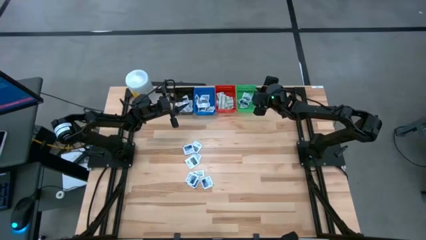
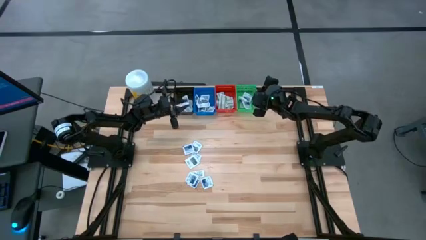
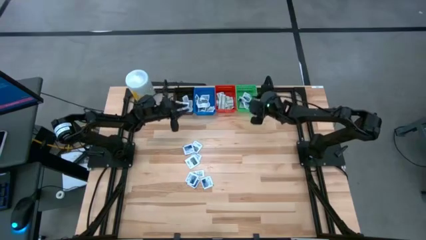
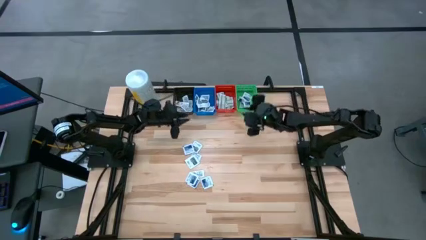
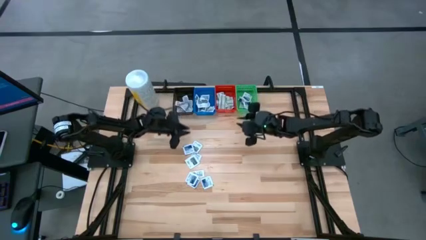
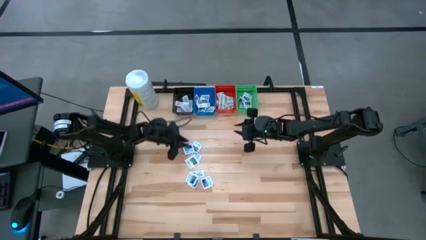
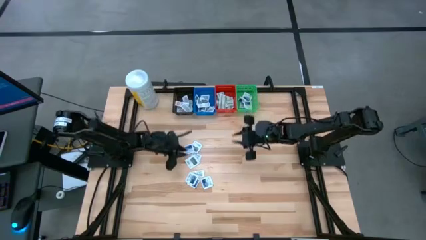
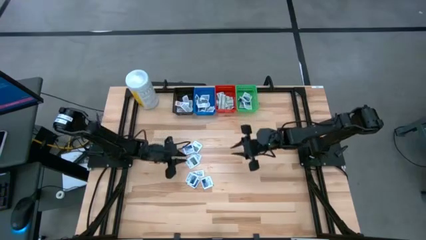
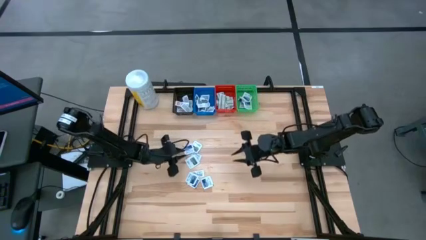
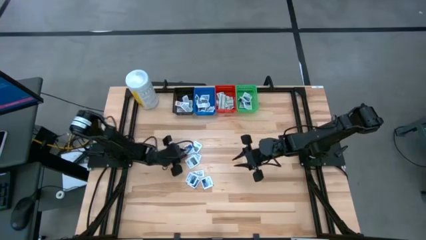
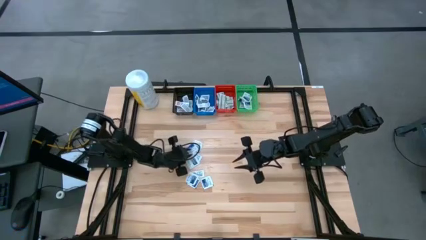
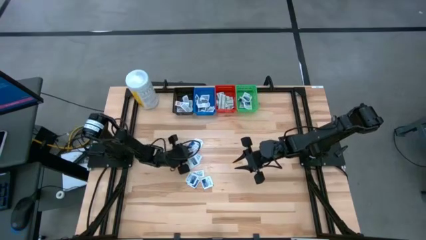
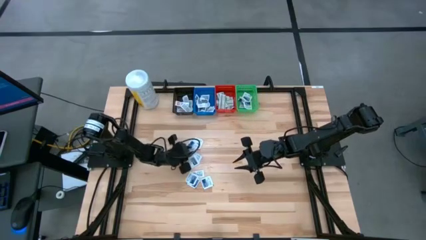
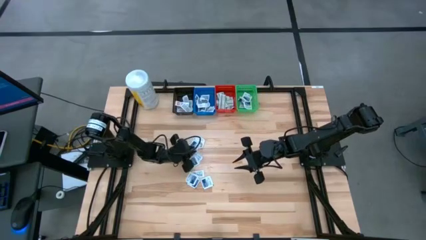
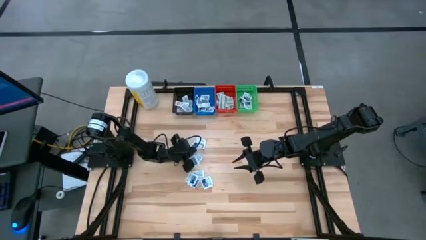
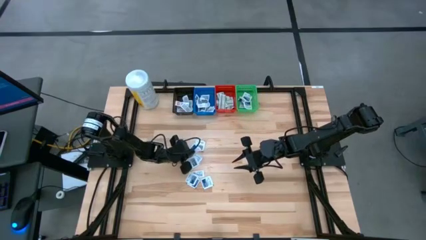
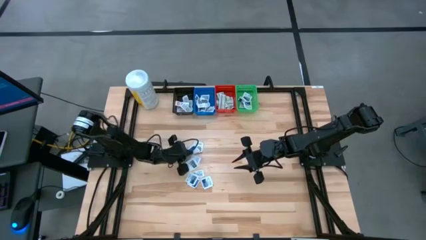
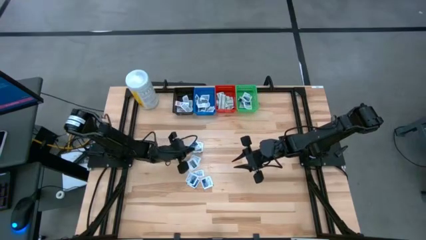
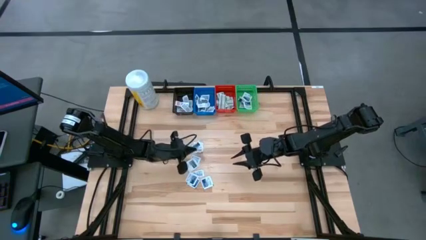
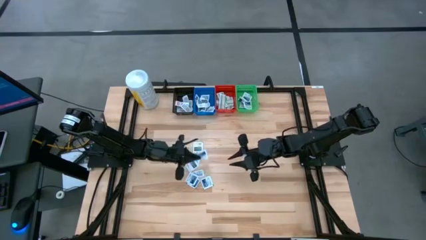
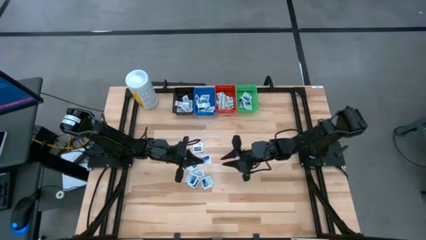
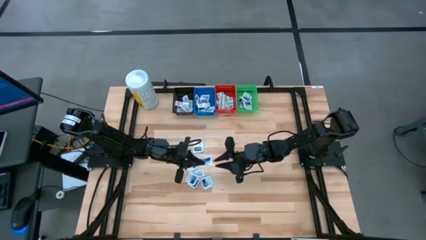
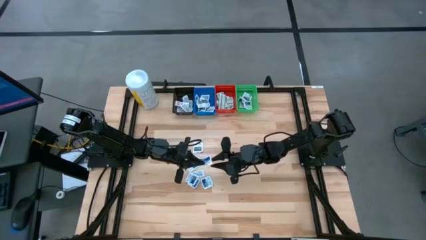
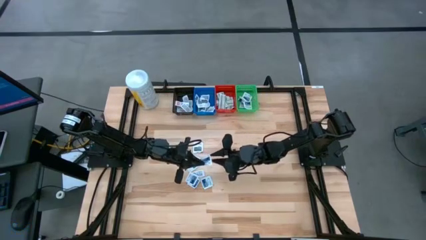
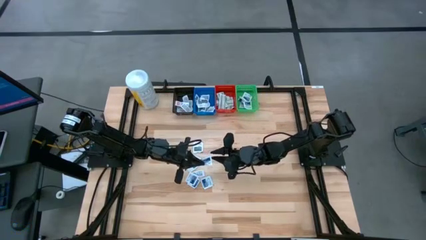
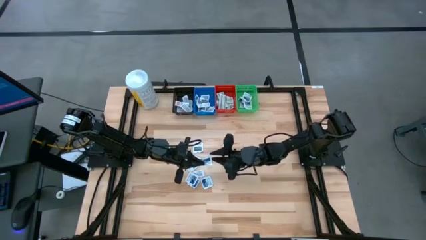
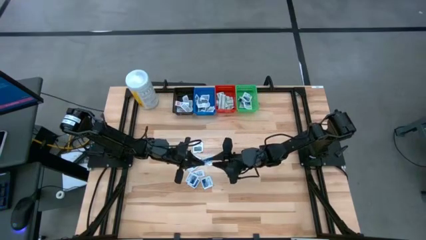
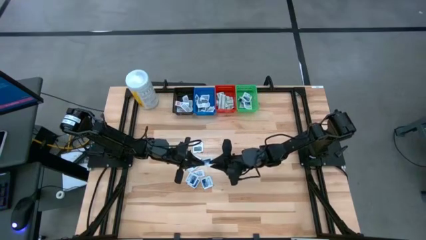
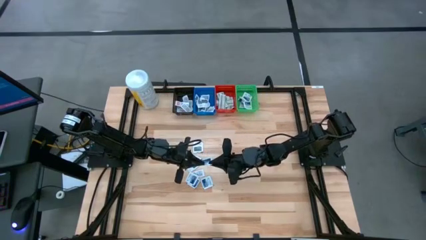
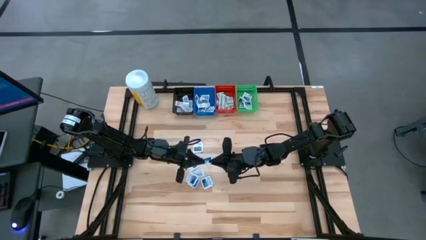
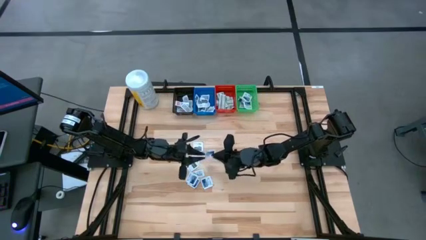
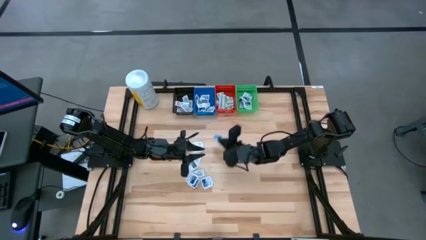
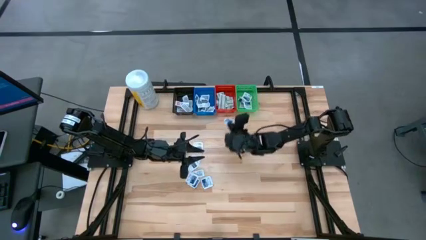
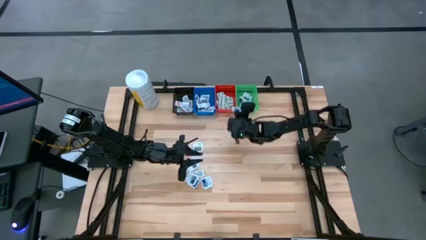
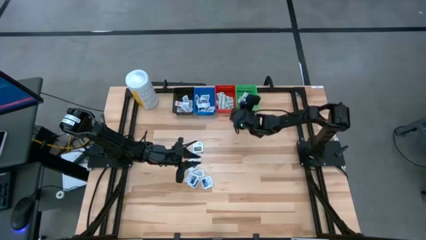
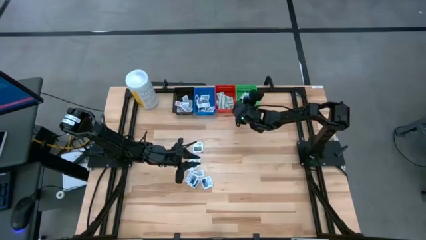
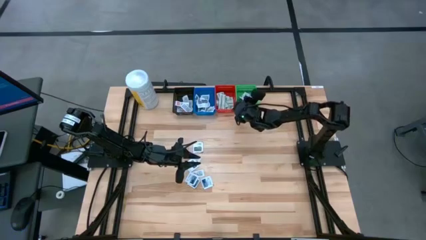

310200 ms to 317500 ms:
Task: Pick & Place First Aid Supplies
Put the blue alcohol pad into the green bin

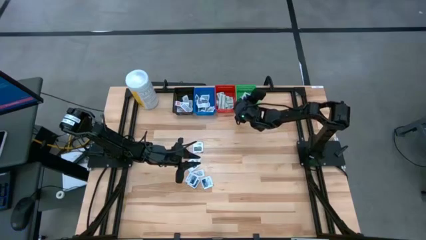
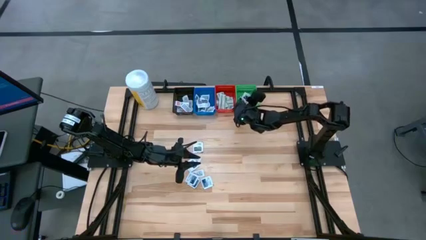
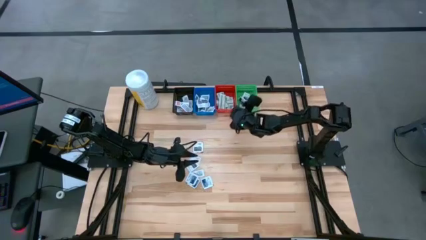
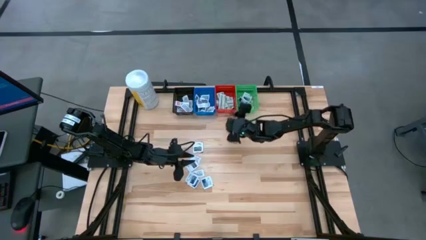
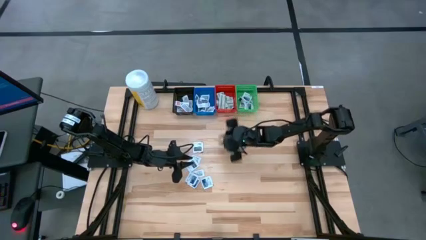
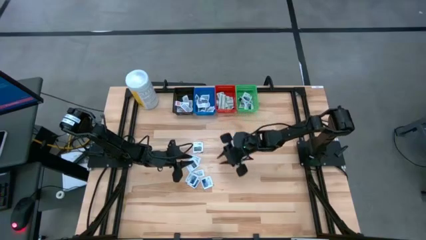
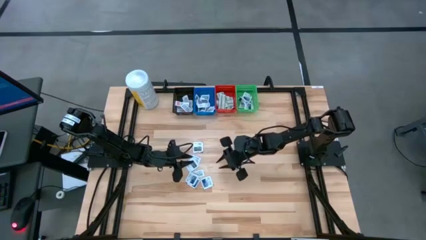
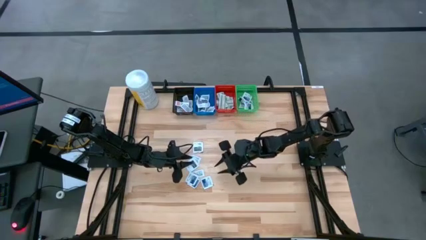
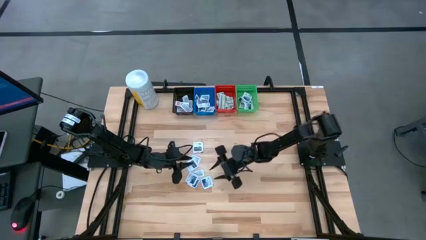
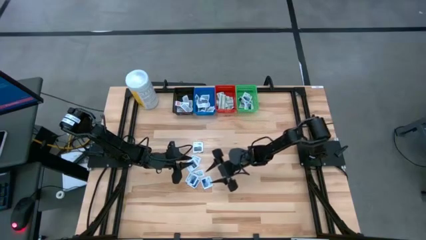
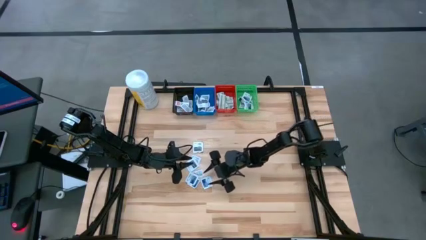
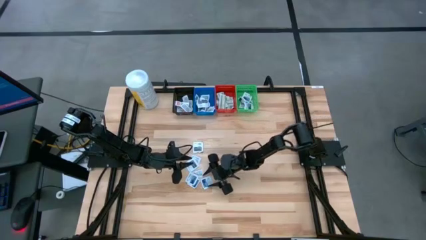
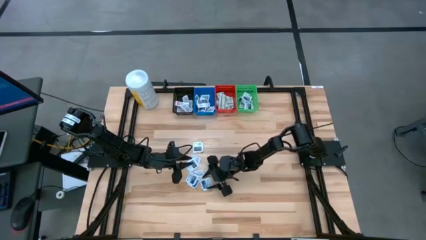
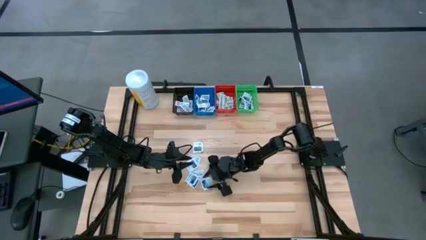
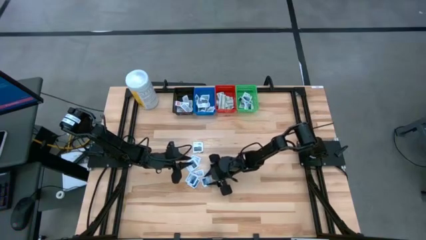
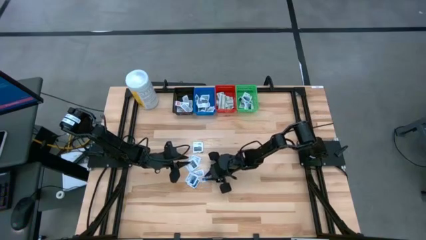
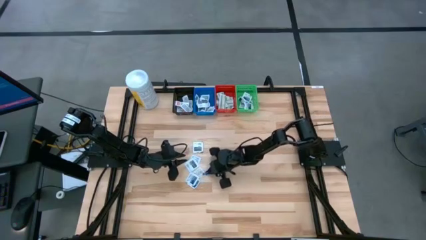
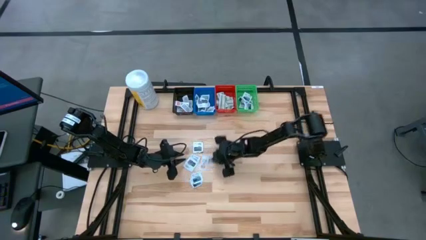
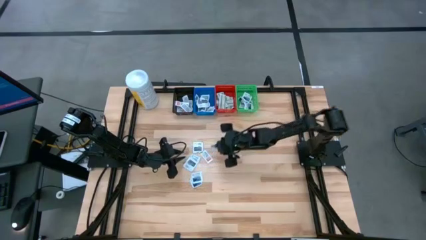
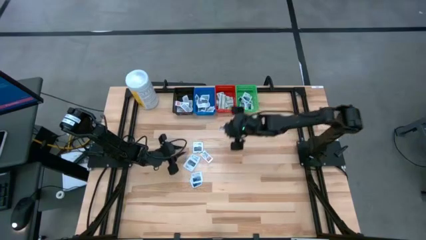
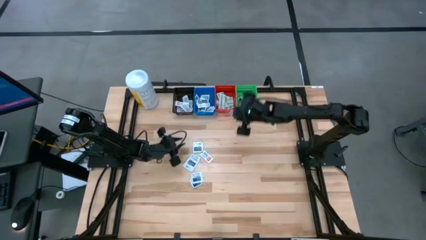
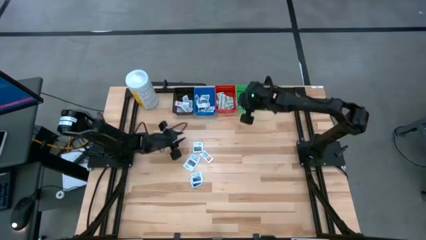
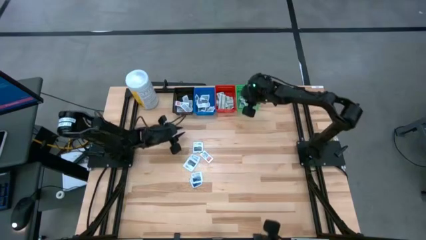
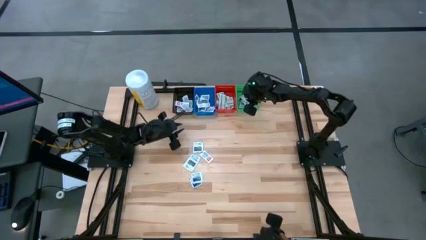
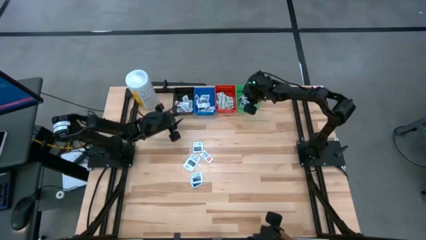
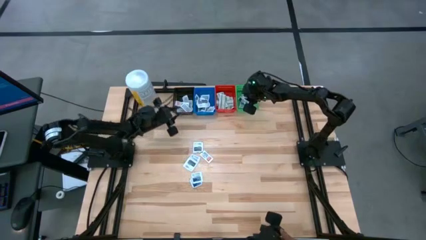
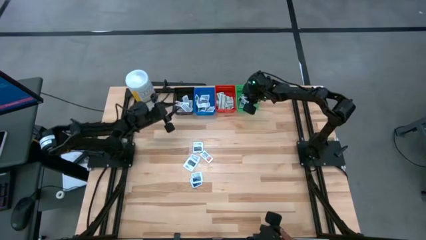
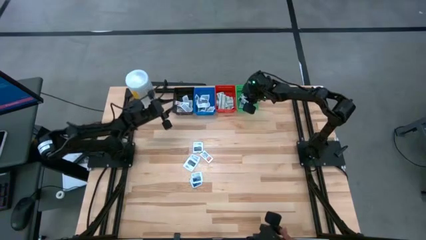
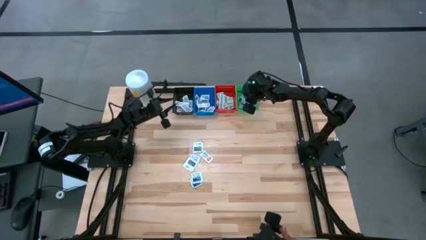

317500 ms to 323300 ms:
Put the blue alcohol pad into the green bin

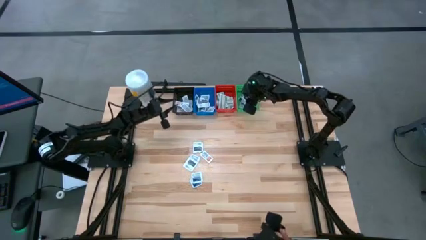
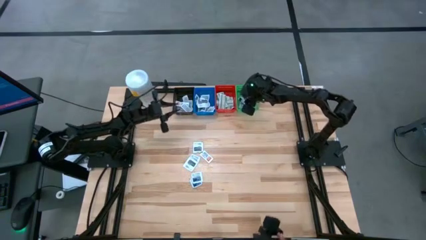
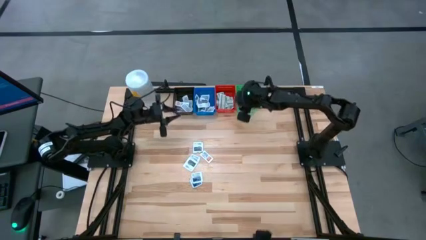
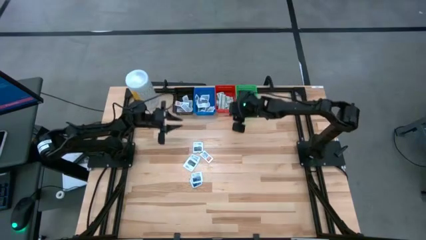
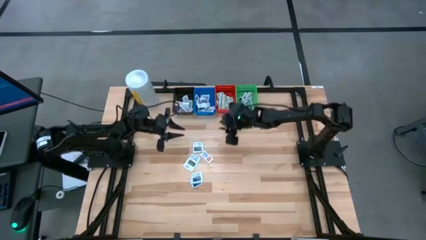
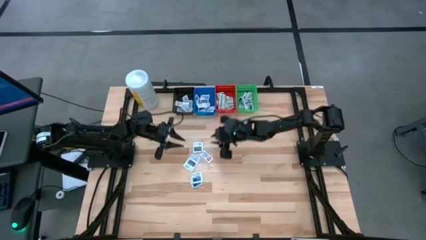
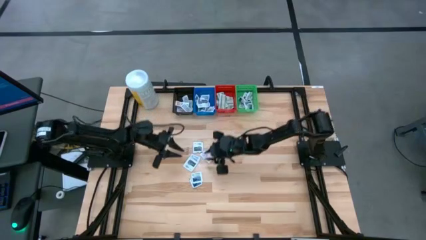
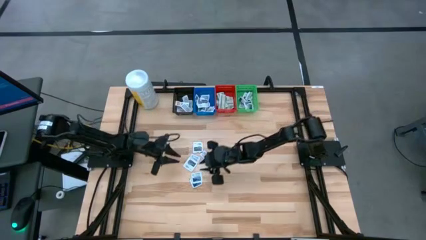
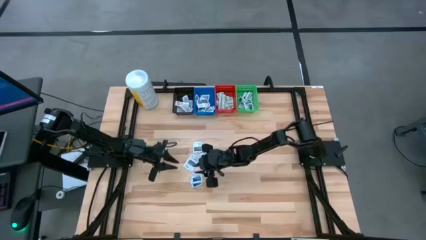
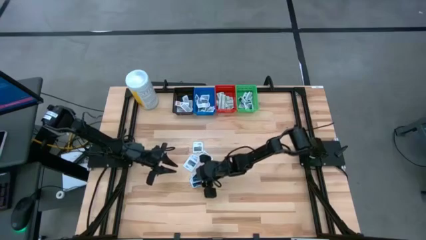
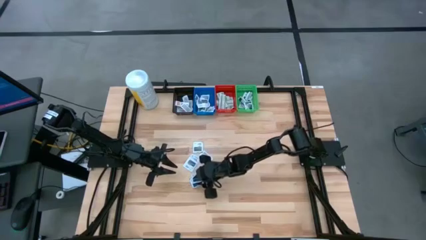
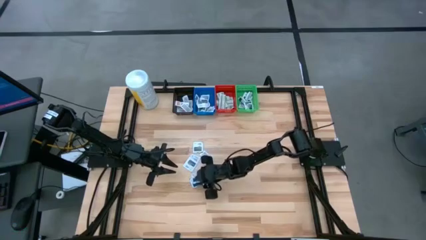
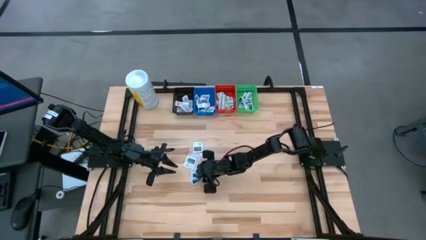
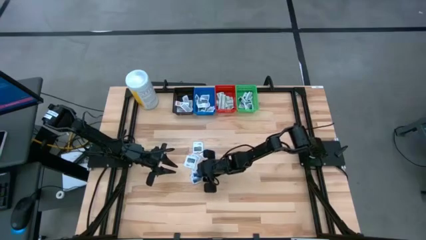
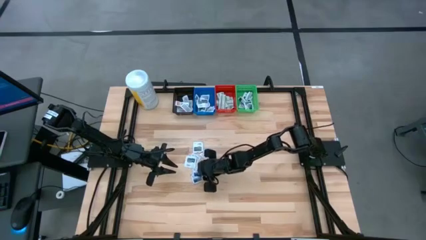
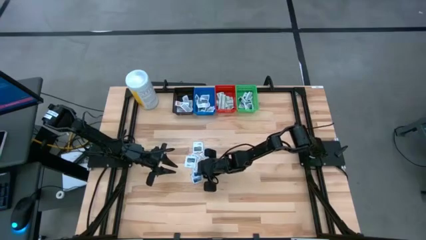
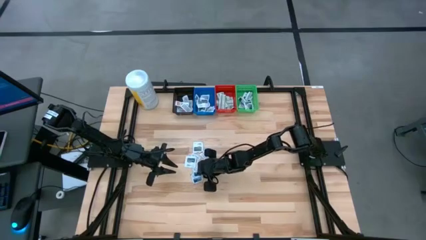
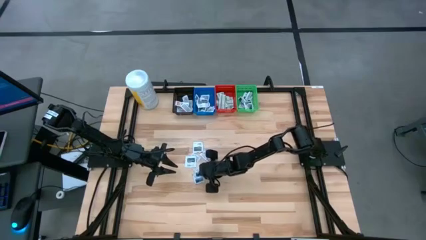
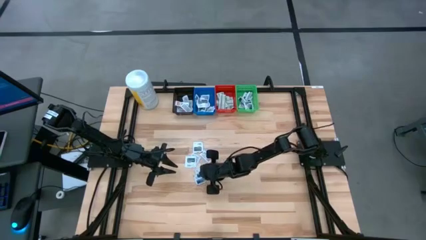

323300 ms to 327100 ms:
Put the blue alcohol pad into the green bin
